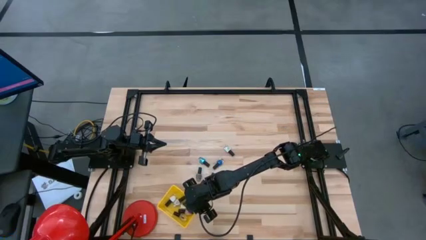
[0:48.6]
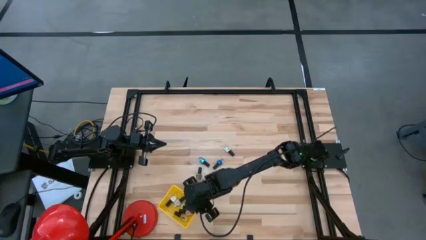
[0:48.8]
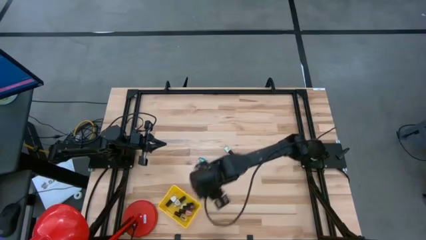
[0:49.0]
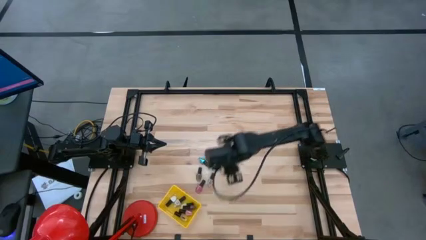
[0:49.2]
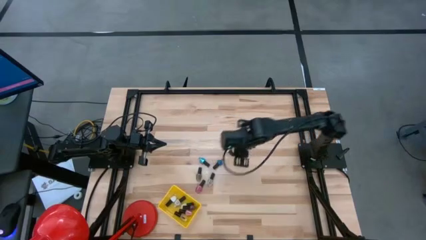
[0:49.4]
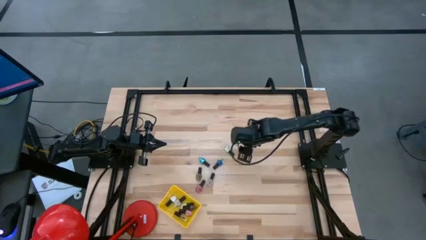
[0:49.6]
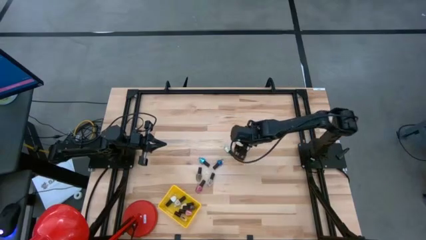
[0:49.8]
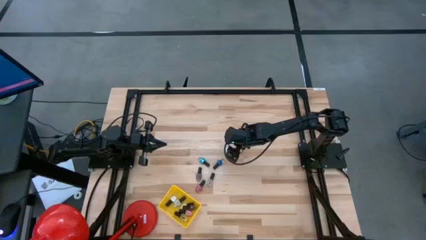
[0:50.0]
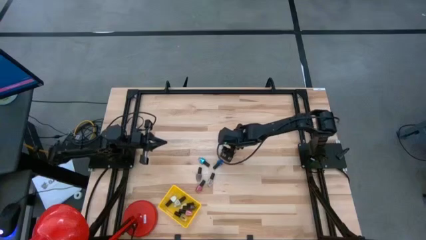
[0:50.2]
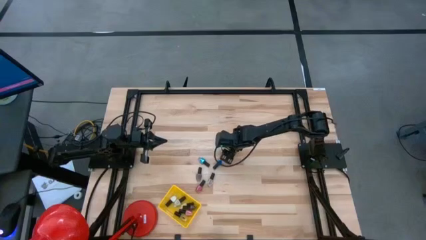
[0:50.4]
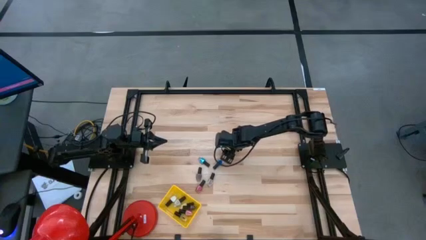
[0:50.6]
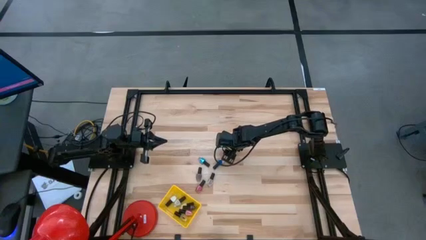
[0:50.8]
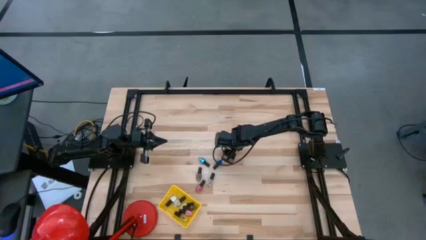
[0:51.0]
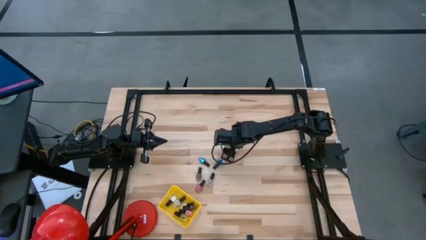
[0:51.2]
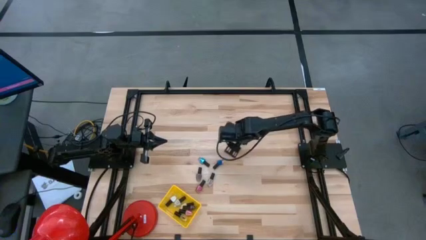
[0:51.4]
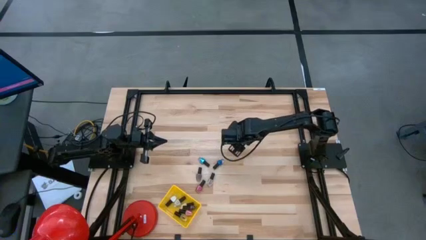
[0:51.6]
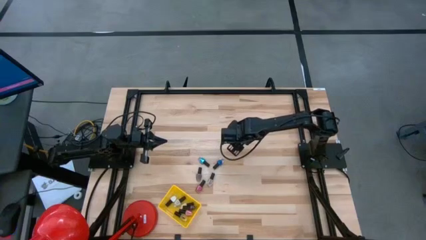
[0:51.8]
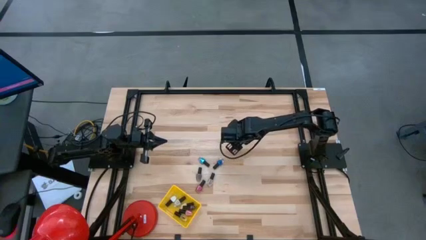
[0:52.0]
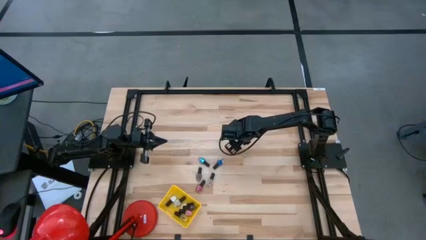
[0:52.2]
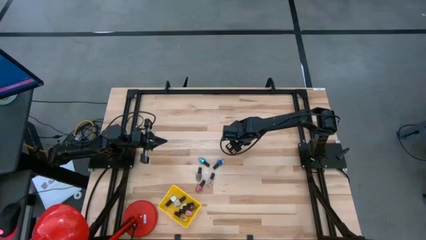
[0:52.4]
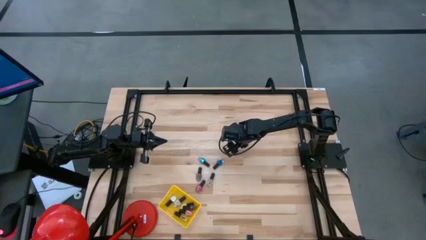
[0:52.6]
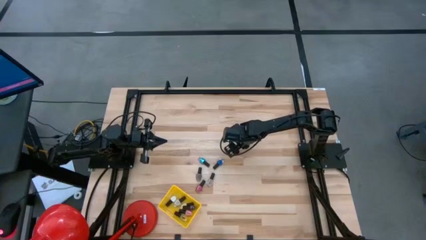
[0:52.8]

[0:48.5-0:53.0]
Task: Pick & Place Nail Polish
Put the light green nail polish into the yellow basket

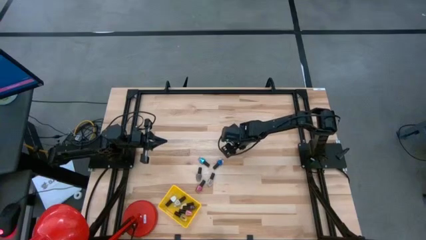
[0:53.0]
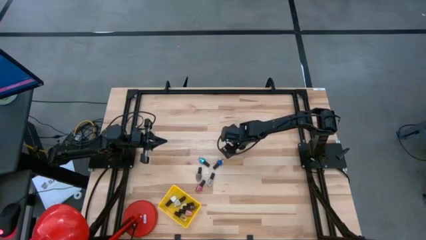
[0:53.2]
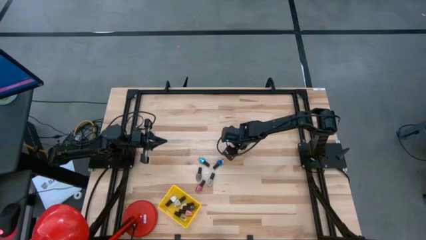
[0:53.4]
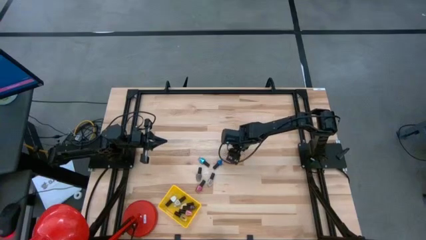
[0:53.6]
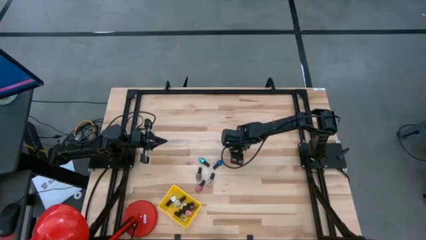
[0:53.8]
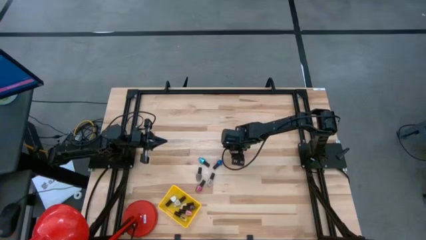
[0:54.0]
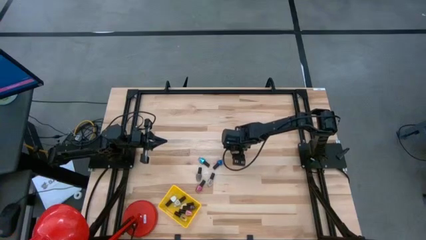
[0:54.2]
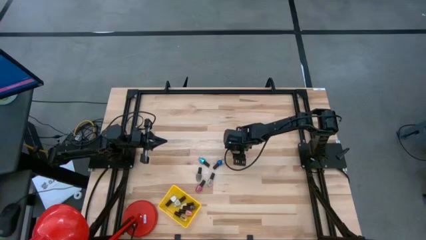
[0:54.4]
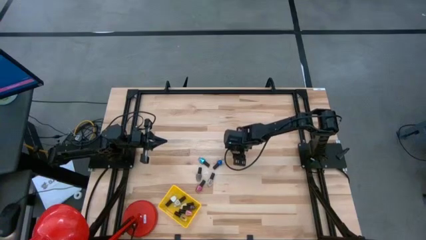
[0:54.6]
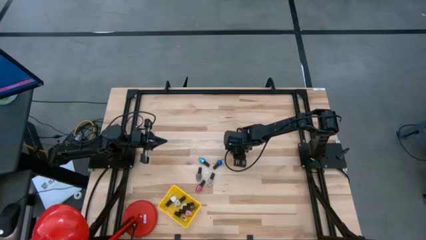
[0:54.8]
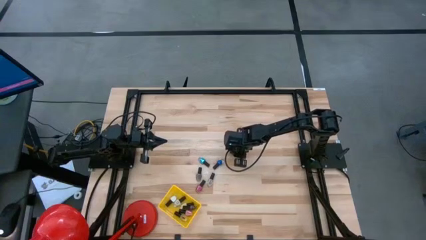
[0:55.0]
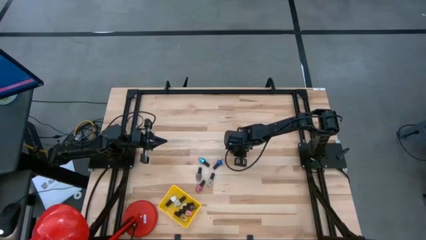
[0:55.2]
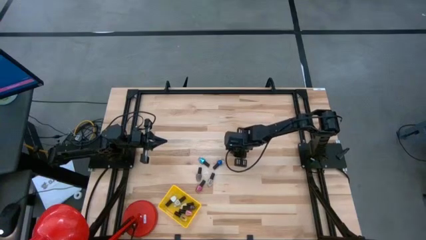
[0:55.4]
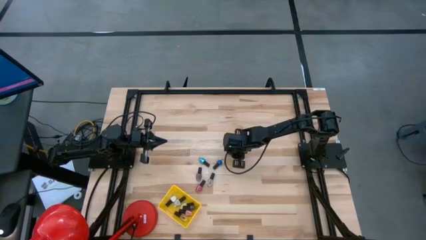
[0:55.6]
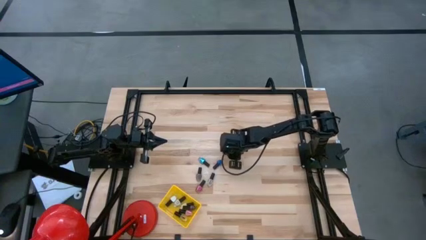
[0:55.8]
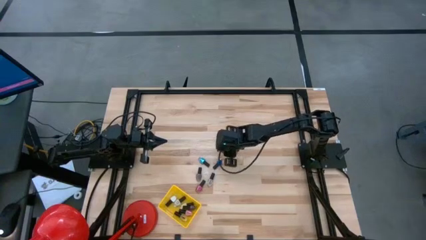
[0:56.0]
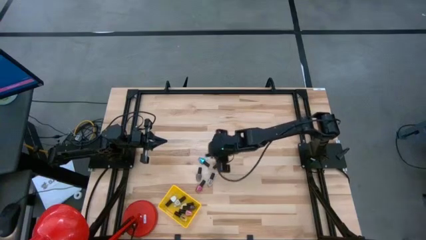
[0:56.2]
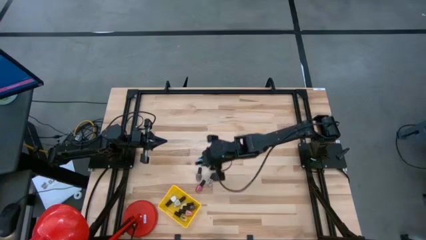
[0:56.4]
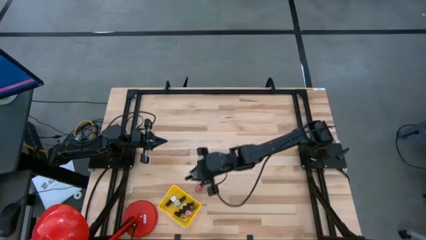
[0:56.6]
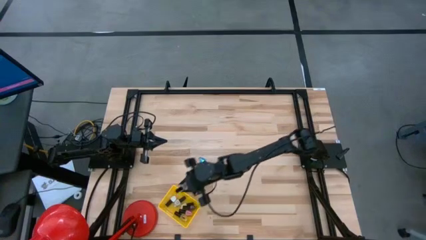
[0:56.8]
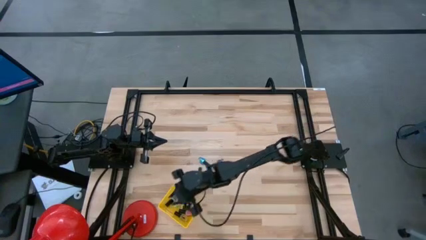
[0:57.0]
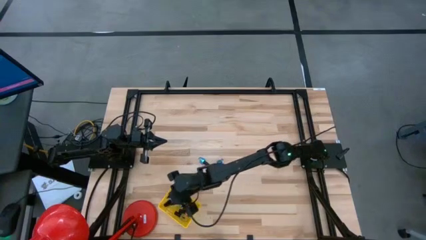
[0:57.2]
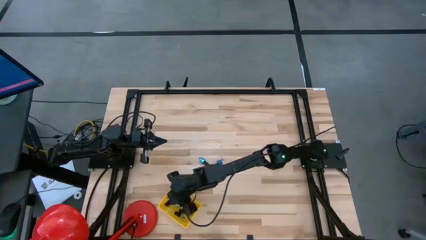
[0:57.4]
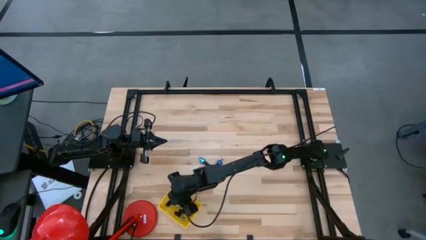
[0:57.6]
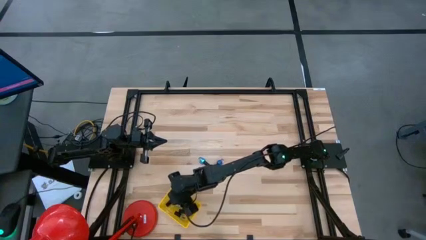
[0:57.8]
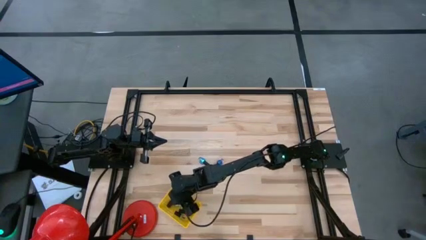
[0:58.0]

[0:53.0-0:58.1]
Put the light green nail polish into the yellow basket

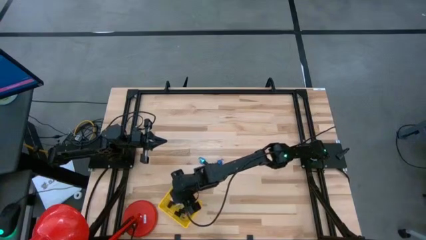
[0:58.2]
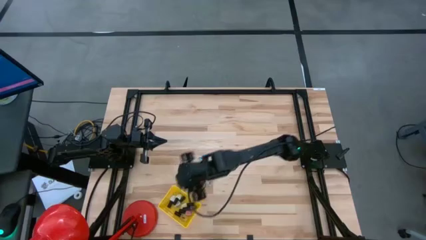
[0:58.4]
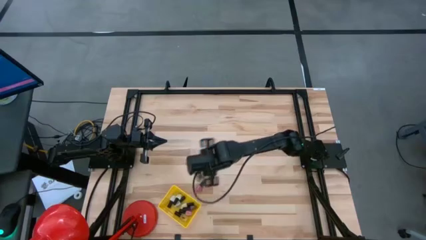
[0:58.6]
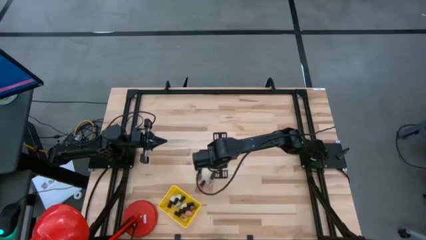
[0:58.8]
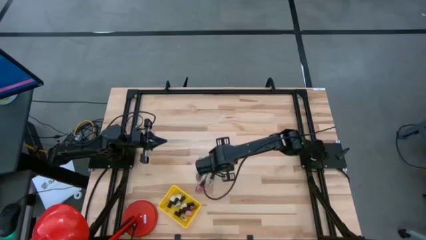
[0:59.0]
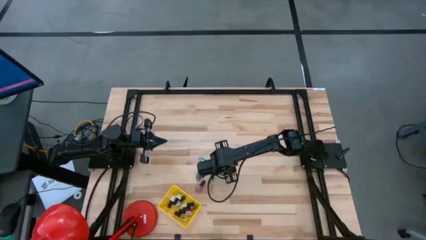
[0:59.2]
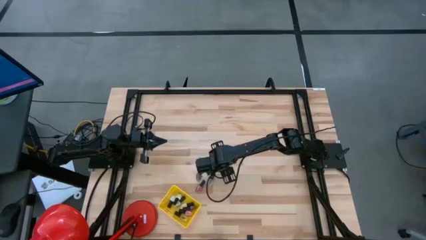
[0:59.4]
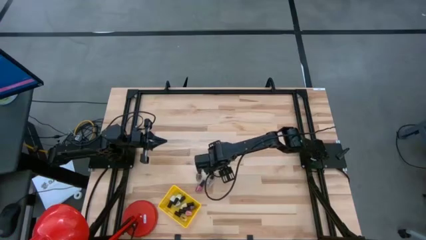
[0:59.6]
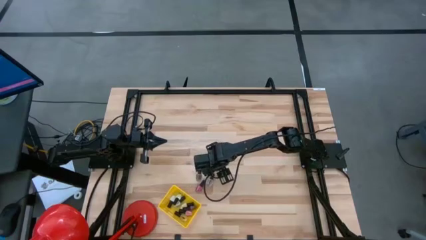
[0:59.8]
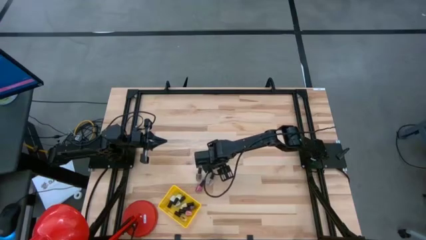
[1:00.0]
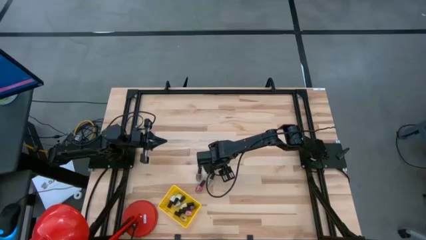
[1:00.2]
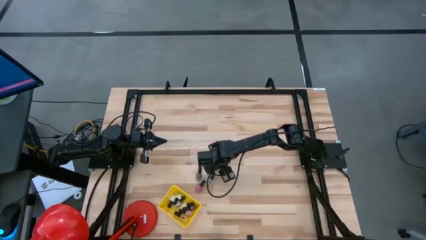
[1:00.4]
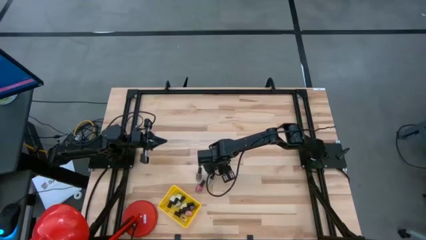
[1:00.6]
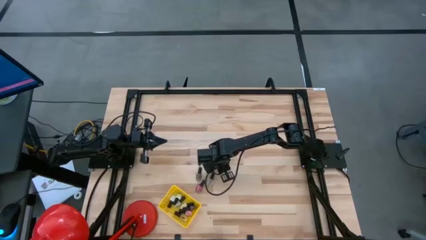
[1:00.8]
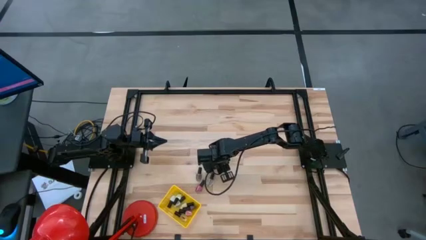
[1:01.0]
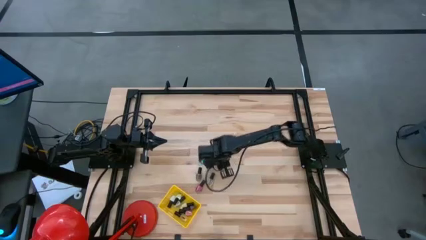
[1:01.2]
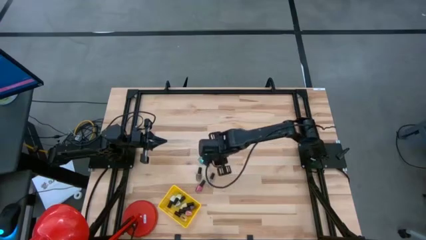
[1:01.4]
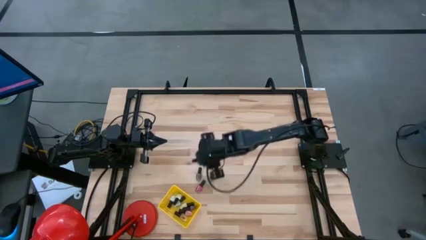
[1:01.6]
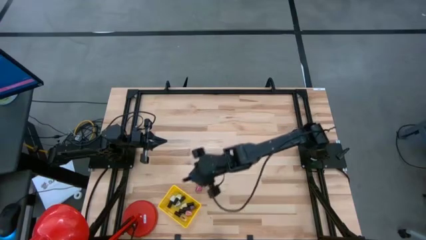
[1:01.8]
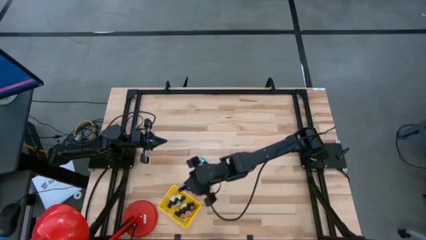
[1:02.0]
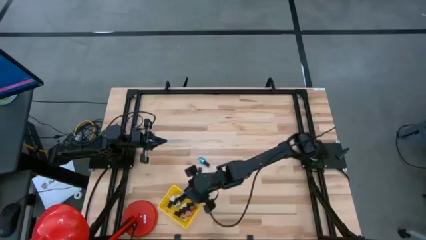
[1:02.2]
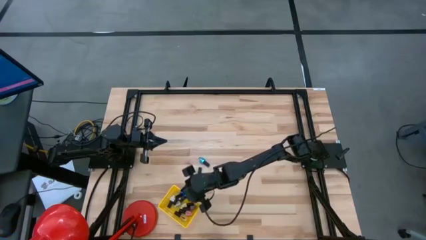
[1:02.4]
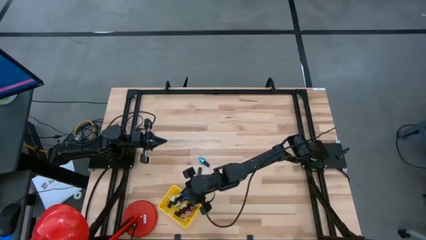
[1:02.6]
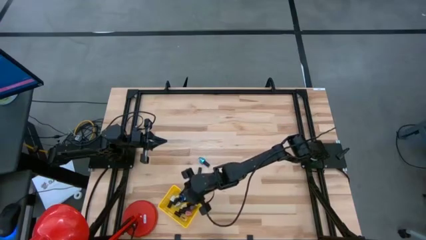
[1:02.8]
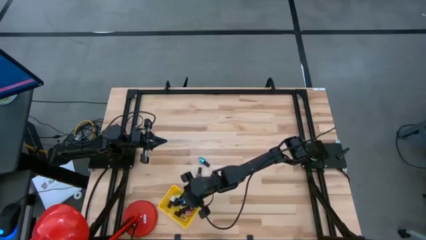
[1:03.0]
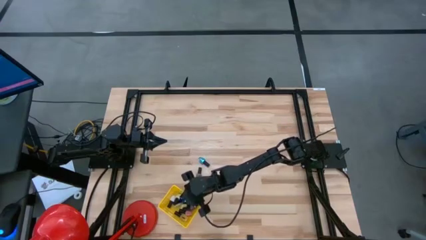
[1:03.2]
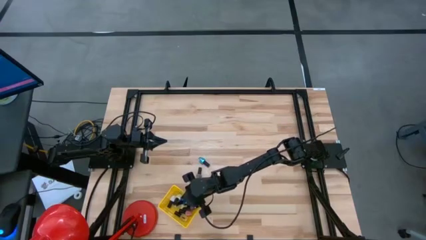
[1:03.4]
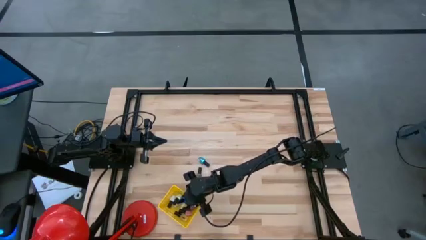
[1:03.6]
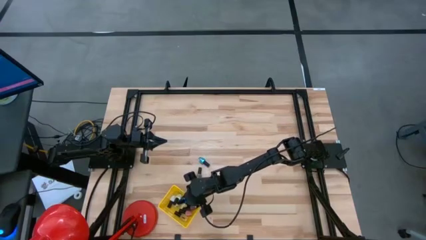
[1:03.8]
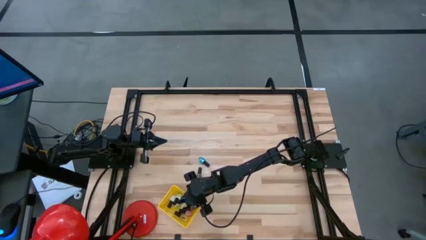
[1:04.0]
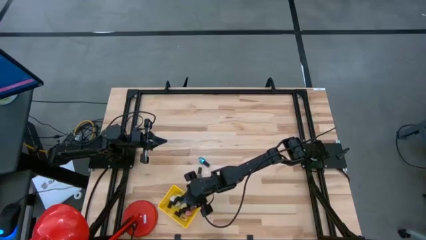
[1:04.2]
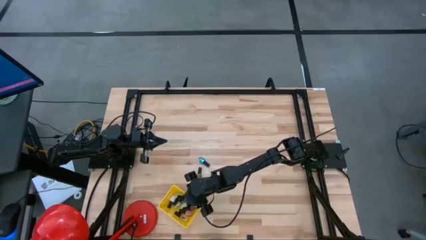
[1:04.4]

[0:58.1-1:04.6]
Put the dark blue nail polish into the yellow basket
